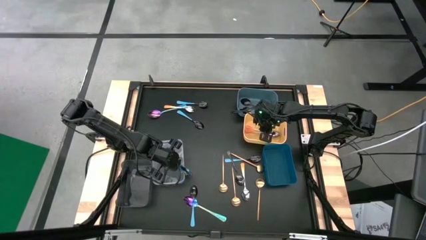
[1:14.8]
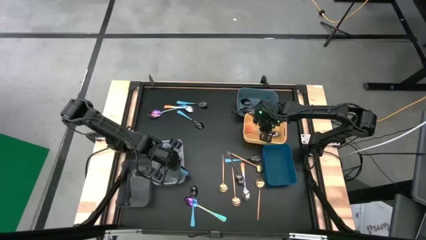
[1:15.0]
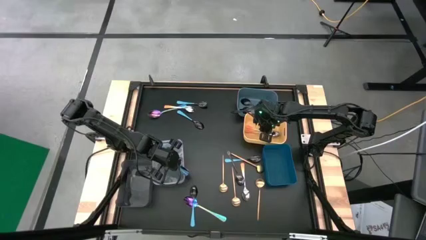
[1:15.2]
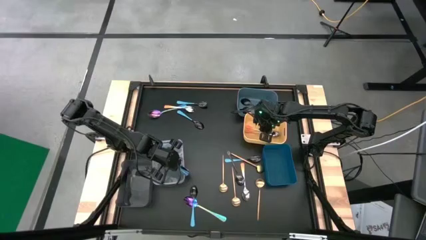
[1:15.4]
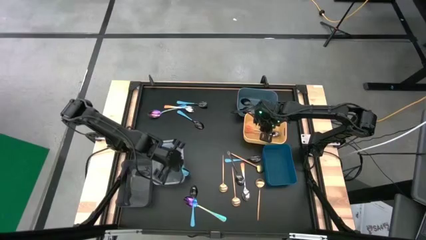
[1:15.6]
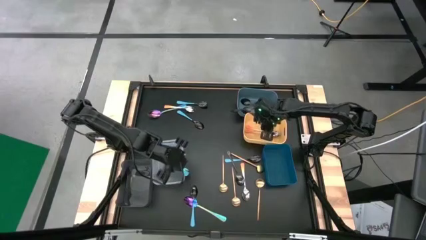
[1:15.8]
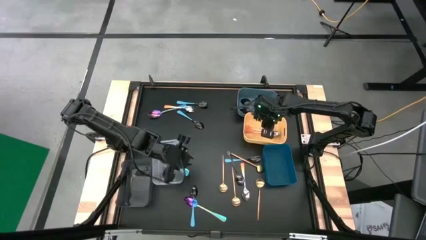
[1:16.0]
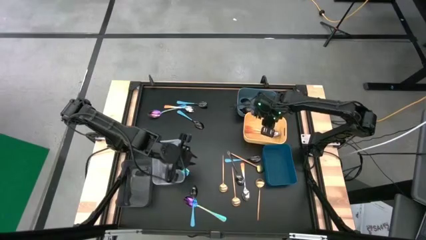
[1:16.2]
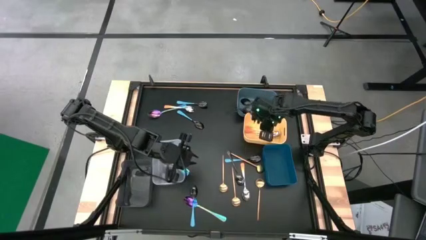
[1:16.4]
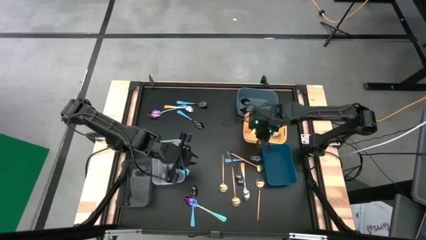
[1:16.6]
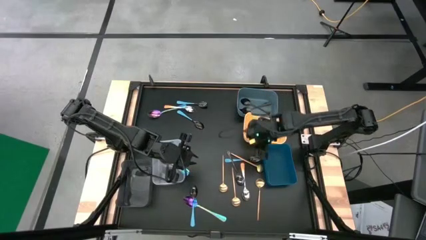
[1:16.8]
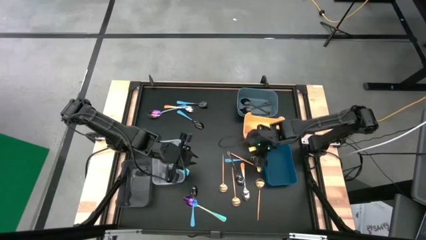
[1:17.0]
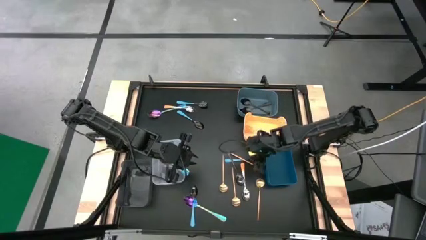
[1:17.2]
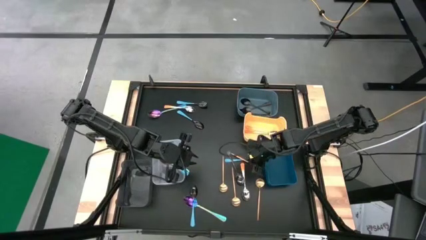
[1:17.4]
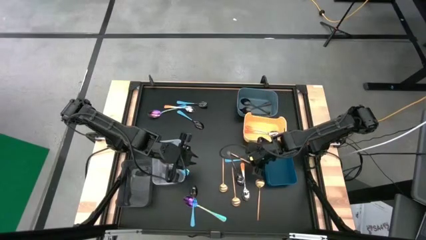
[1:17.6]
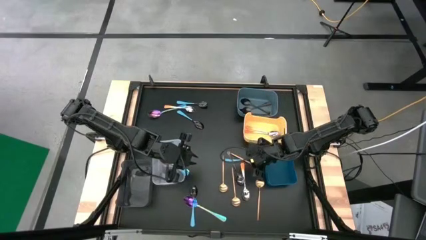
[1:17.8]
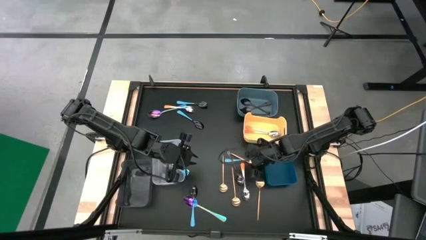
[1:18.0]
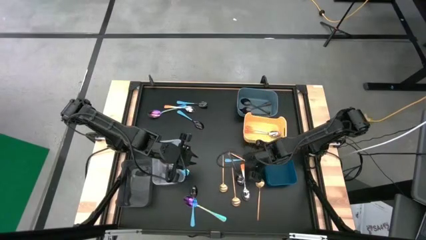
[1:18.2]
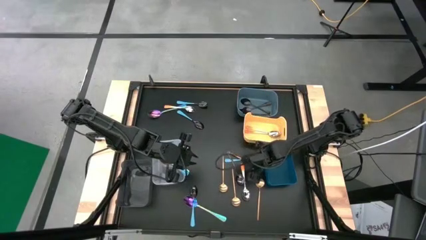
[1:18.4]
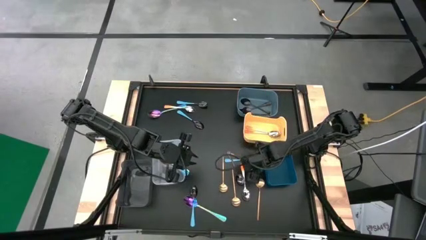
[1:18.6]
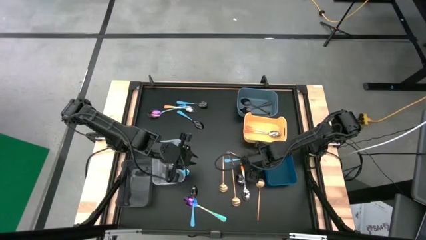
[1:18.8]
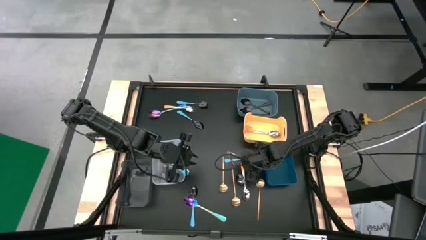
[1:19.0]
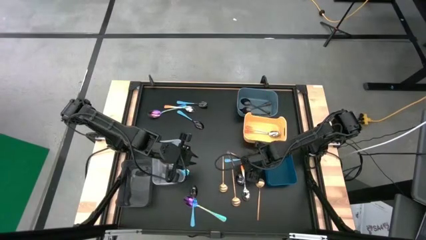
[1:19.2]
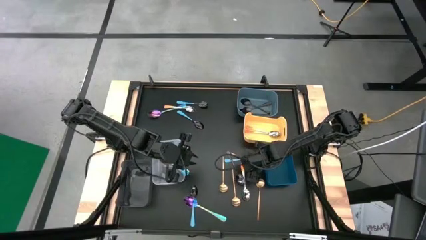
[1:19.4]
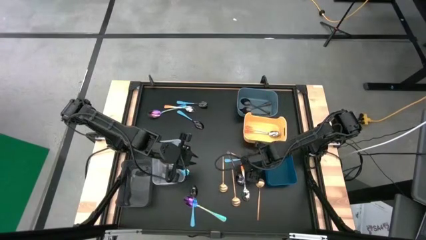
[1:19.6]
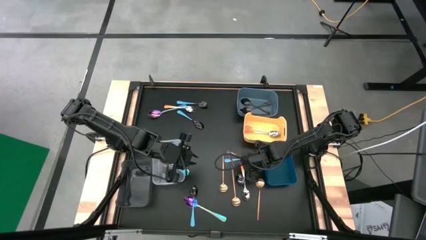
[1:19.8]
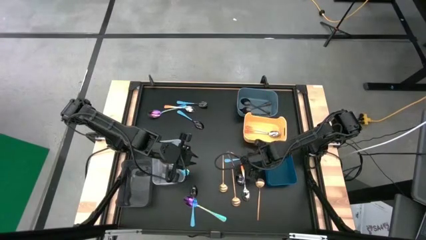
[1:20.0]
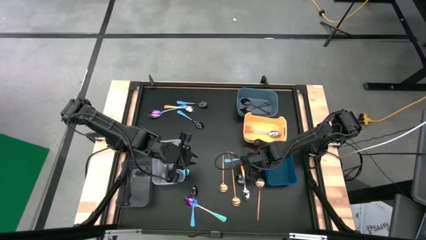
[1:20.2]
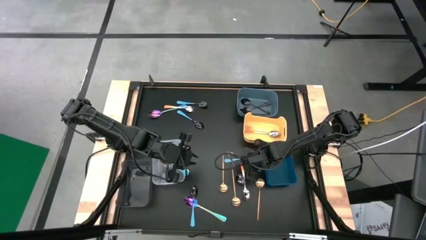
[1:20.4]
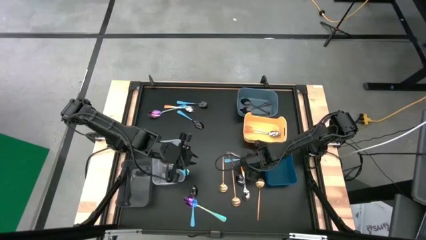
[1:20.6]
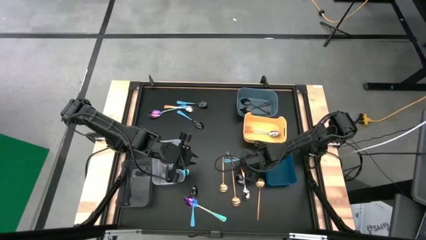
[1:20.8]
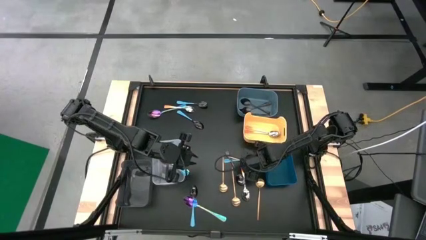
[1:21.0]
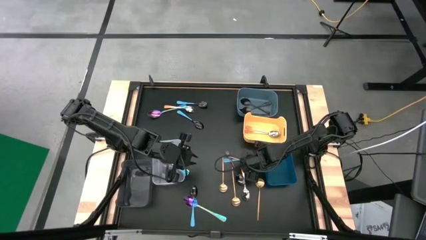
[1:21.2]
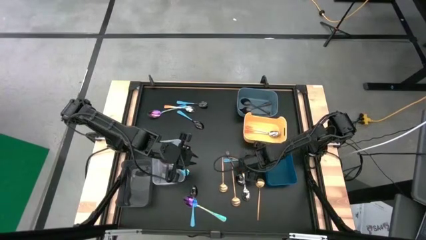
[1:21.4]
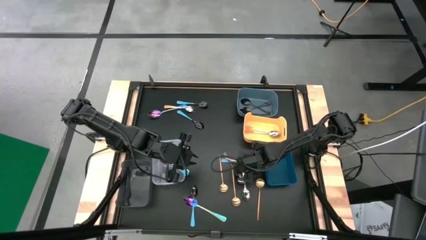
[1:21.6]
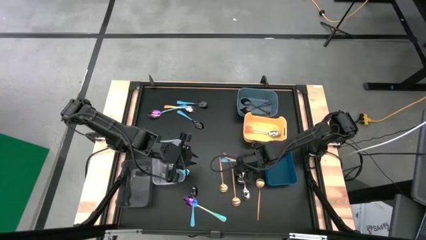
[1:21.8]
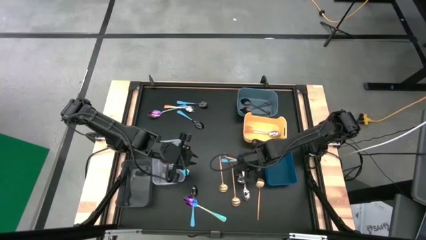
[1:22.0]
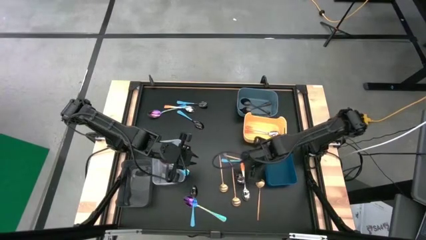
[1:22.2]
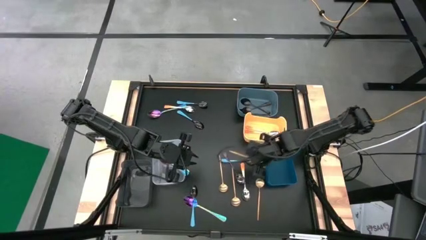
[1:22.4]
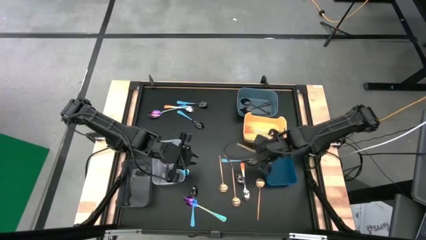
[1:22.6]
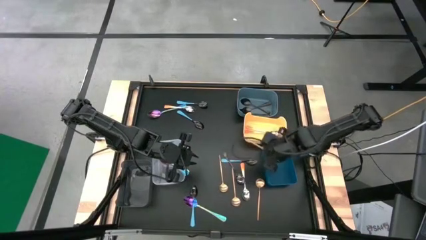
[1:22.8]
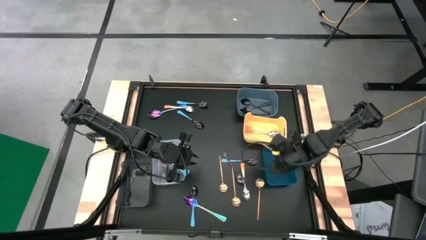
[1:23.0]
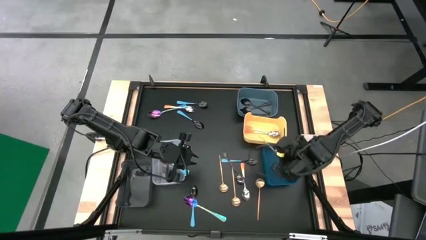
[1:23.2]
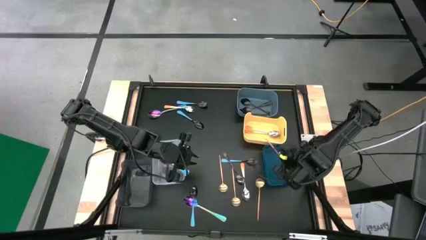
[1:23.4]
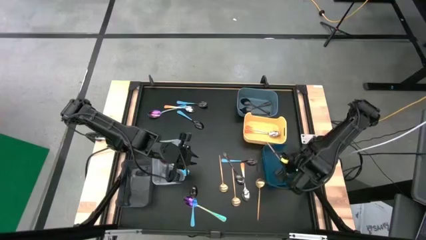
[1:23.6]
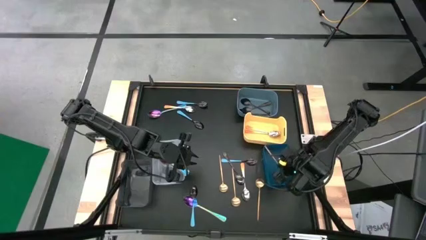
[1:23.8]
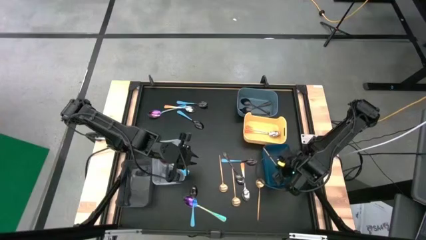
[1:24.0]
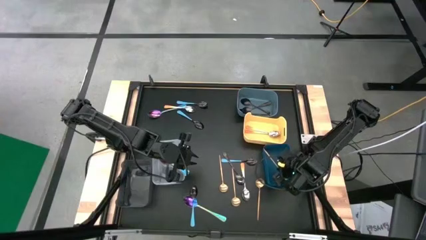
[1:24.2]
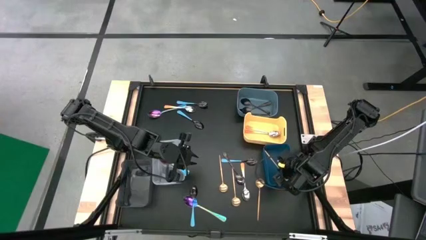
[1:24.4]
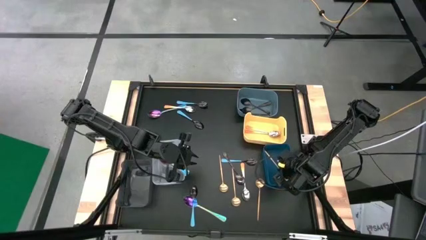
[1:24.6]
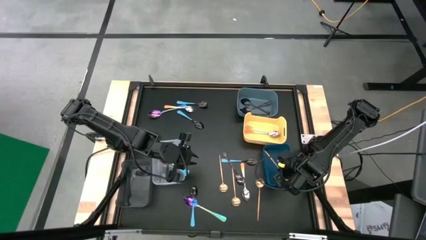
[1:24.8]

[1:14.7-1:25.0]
Task: Sort silverware by color (type)
Put the yellow spoon into the blue bin

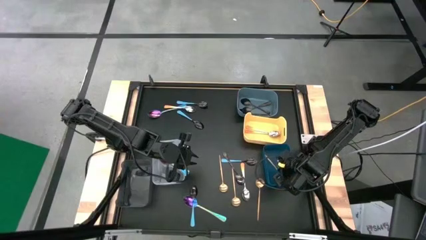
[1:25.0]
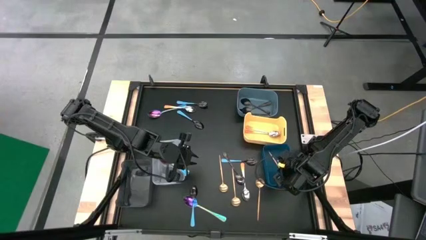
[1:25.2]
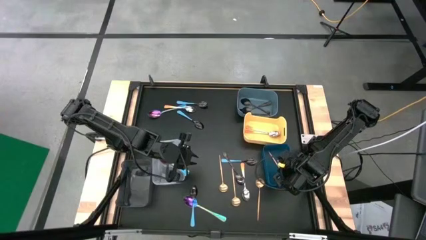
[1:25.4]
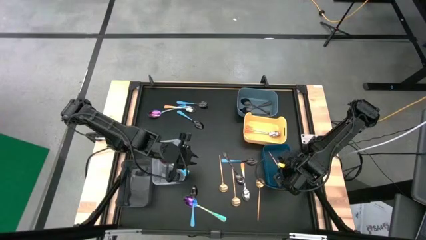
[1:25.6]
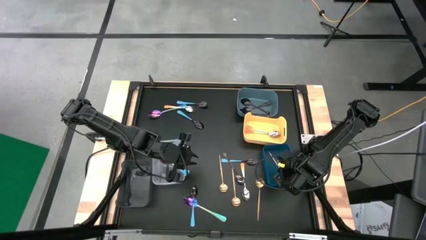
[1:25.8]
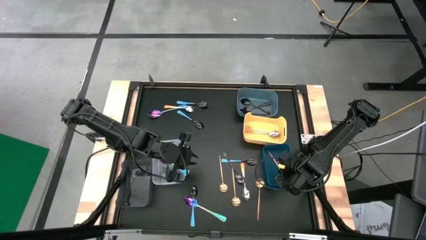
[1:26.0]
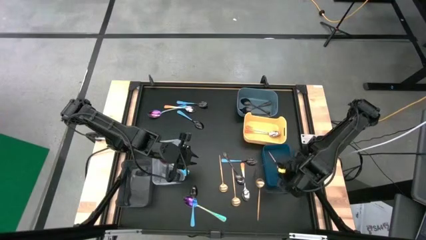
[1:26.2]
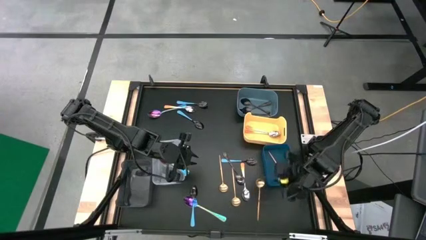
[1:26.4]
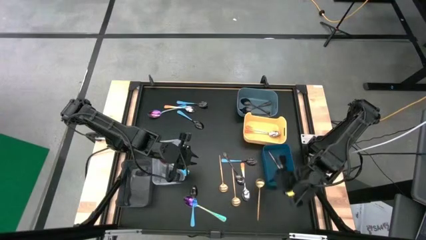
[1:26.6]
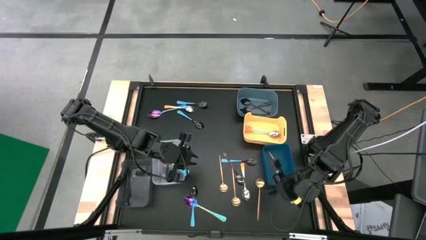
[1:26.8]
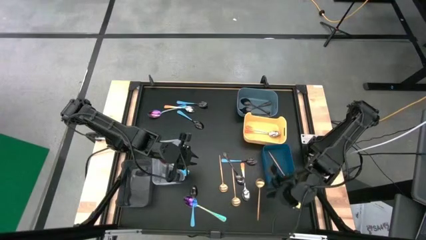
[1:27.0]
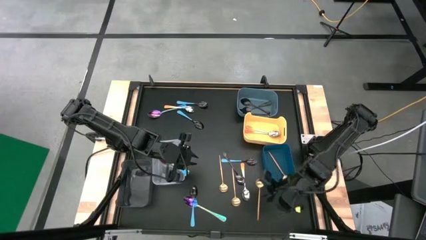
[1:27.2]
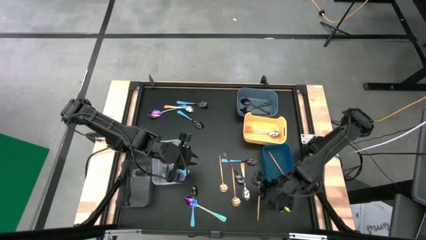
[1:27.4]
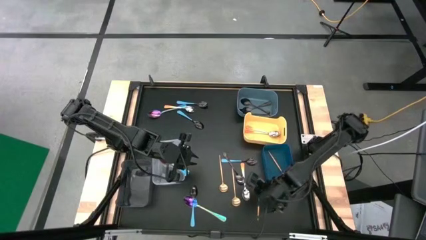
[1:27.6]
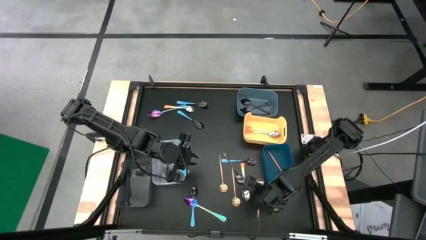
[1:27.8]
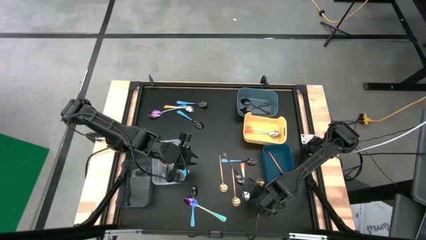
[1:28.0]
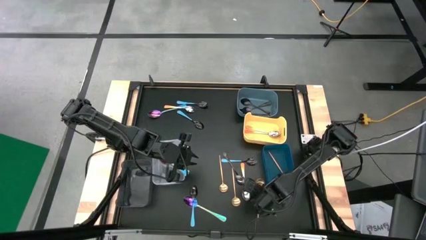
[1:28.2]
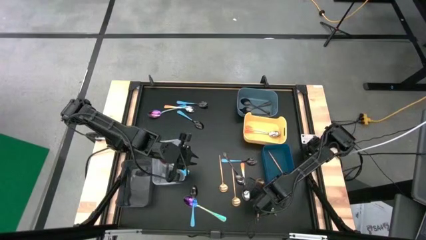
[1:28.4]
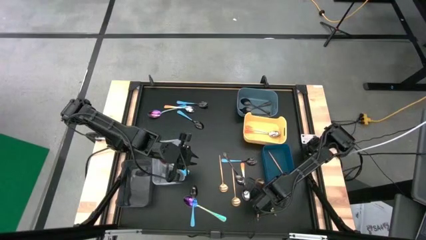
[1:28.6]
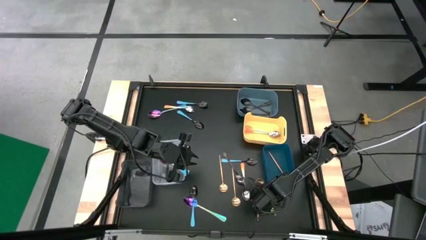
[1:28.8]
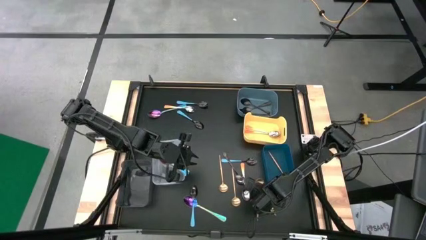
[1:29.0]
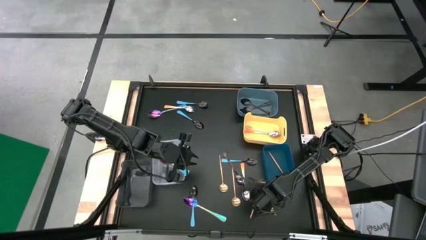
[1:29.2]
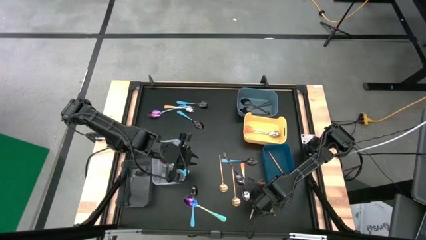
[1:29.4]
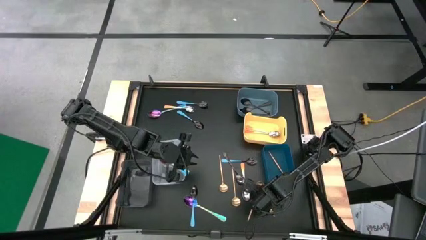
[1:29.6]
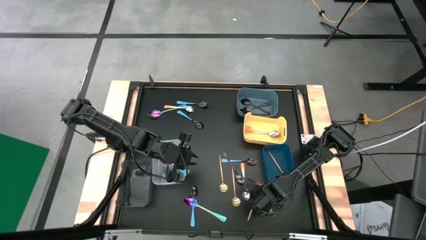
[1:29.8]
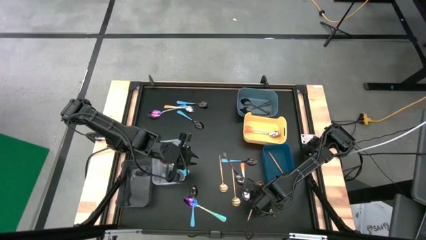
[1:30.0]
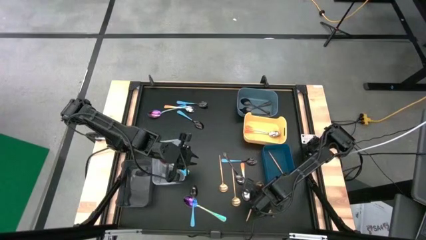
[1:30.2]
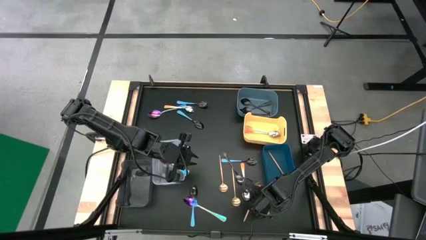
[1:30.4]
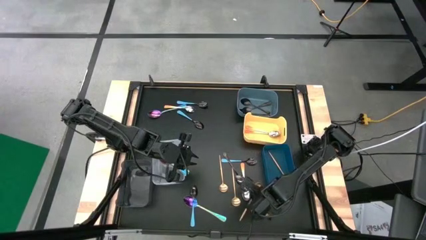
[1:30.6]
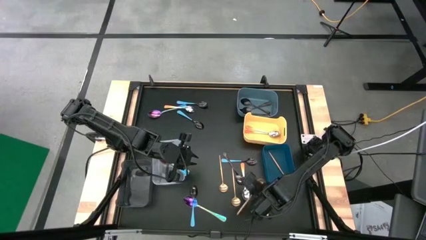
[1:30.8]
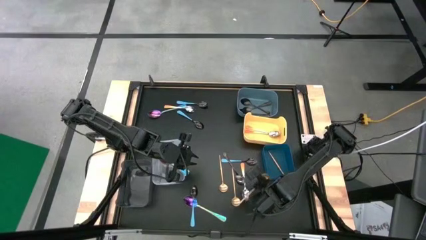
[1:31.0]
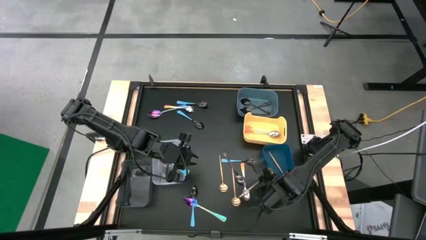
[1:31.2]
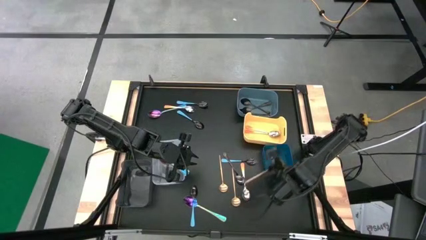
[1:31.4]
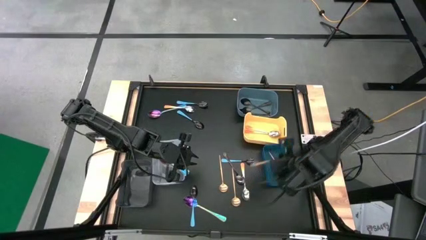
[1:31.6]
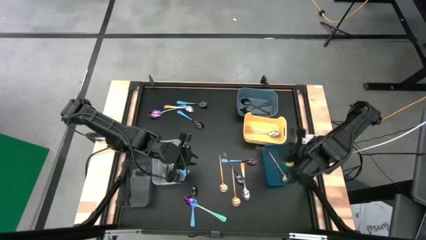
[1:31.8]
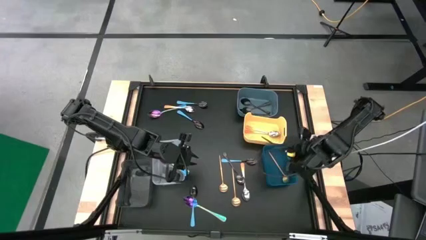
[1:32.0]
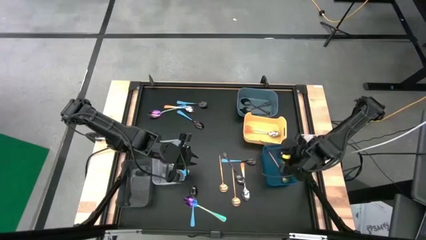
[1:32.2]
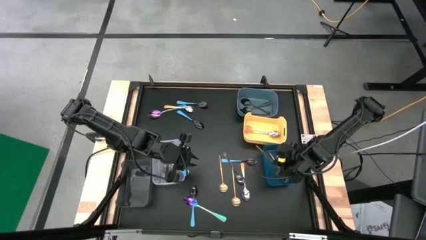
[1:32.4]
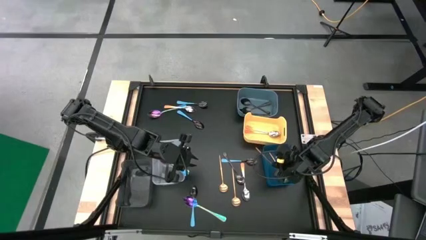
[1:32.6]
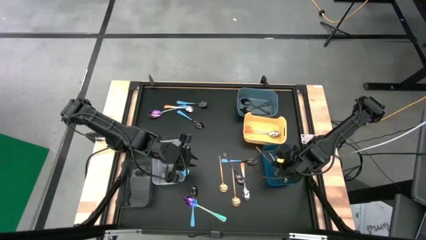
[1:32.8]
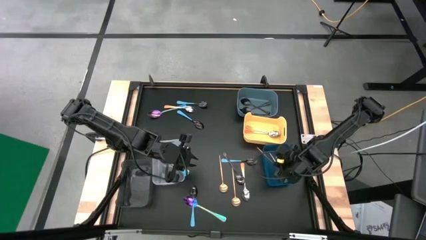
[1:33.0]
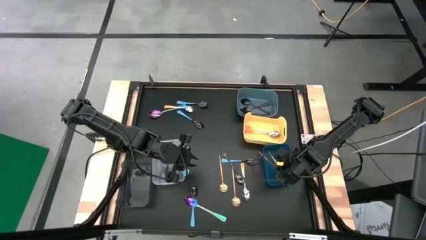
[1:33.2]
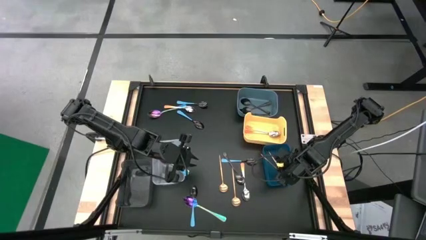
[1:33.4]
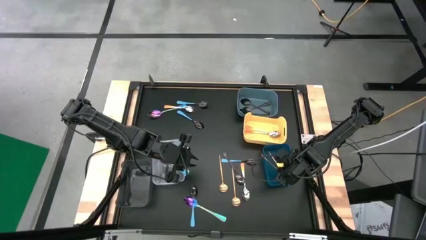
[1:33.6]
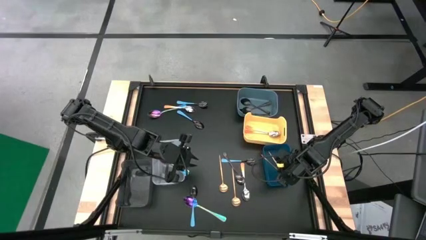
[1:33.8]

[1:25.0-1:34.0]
Put the yellow spoon into the blue bin
